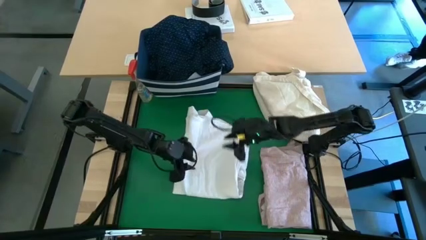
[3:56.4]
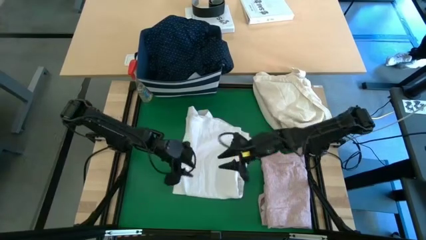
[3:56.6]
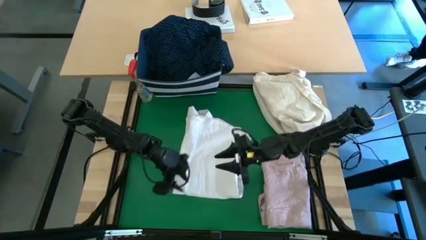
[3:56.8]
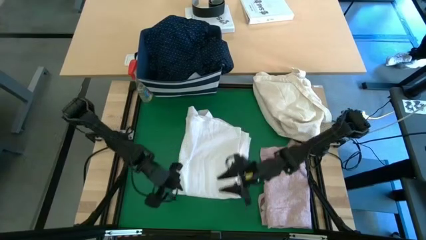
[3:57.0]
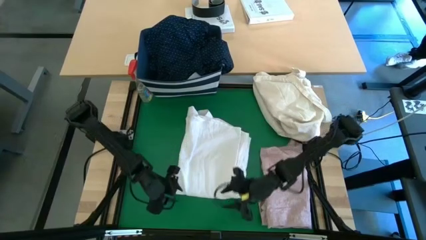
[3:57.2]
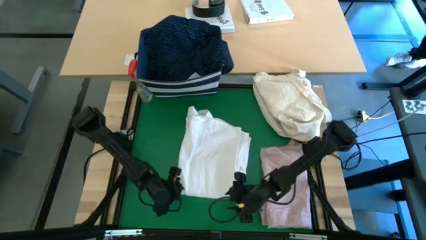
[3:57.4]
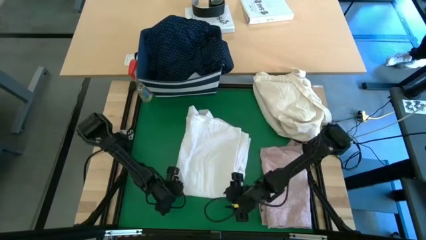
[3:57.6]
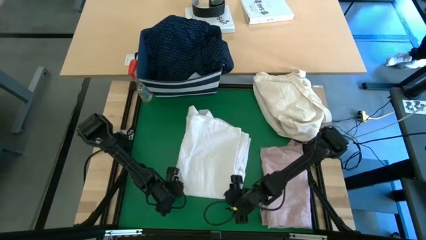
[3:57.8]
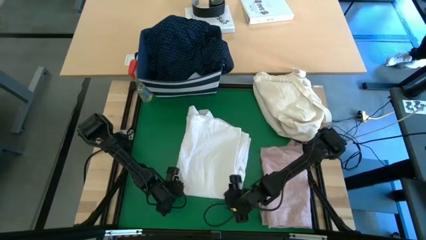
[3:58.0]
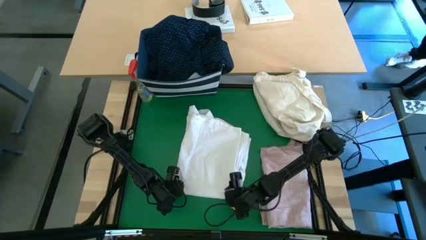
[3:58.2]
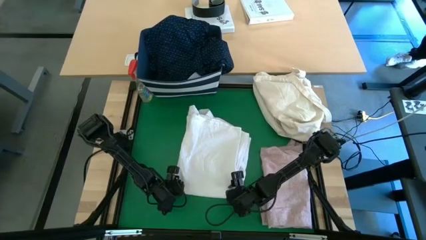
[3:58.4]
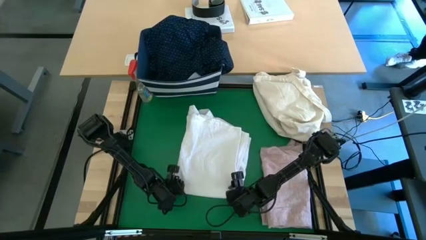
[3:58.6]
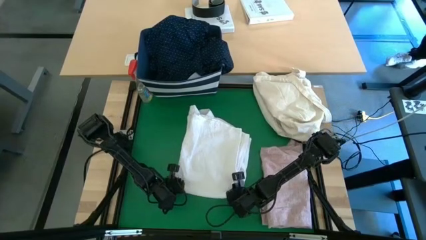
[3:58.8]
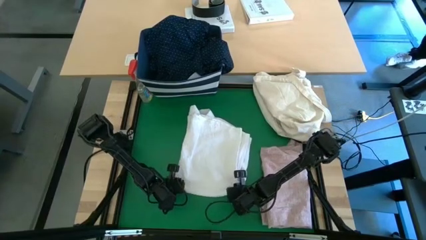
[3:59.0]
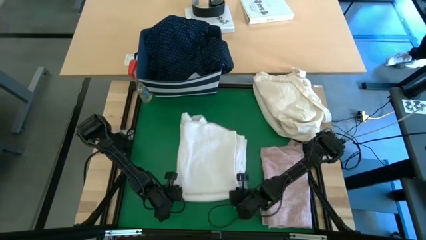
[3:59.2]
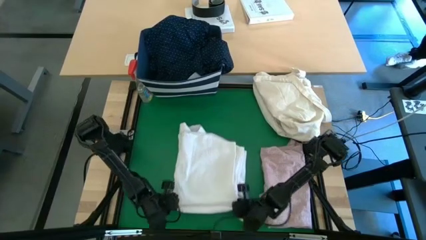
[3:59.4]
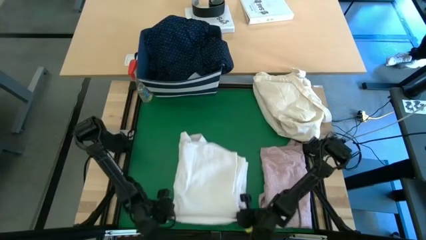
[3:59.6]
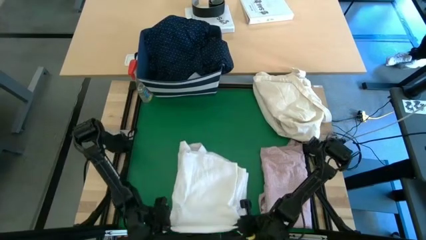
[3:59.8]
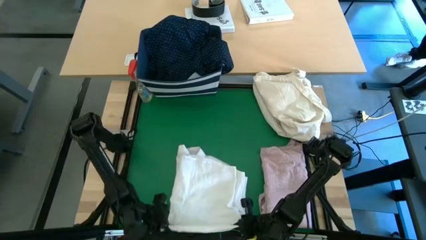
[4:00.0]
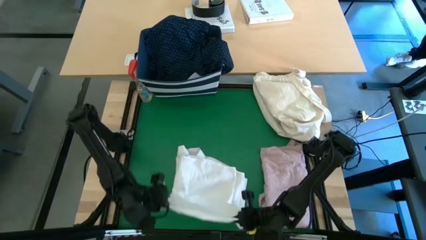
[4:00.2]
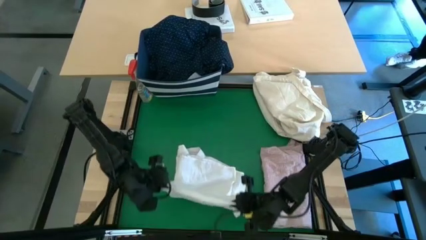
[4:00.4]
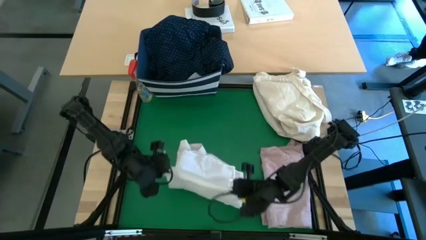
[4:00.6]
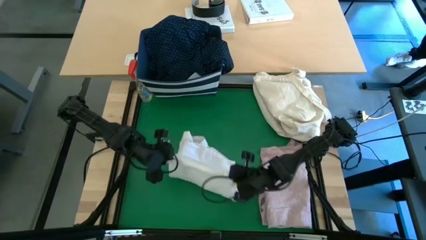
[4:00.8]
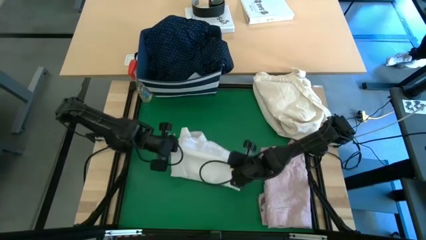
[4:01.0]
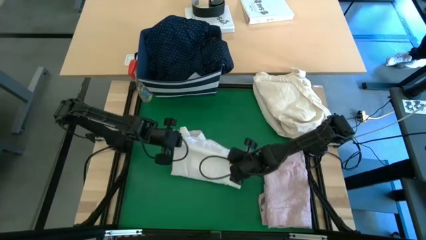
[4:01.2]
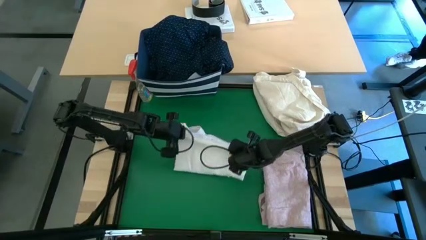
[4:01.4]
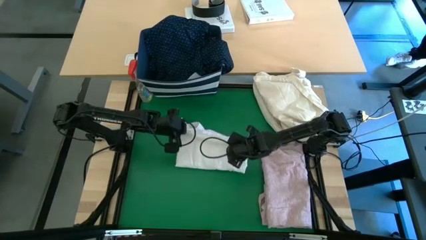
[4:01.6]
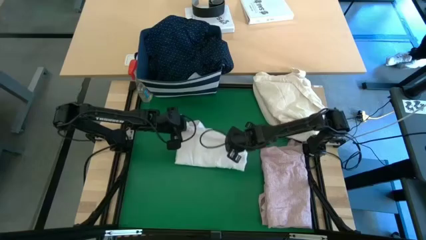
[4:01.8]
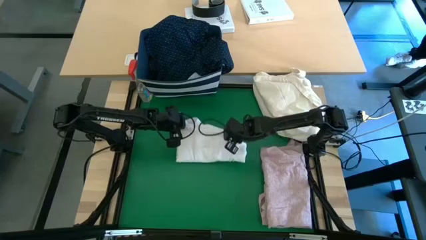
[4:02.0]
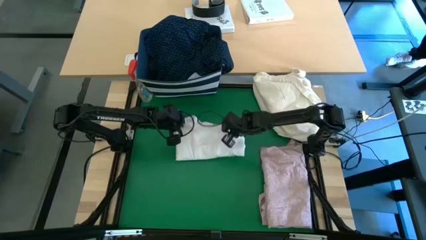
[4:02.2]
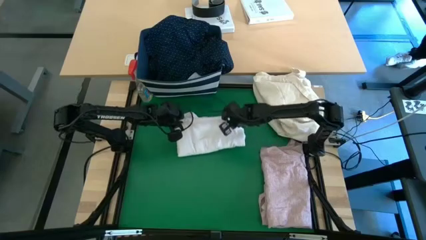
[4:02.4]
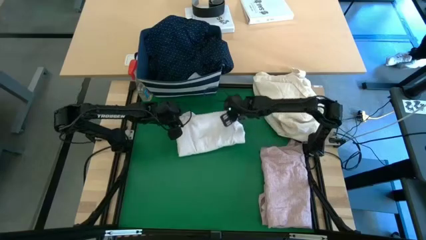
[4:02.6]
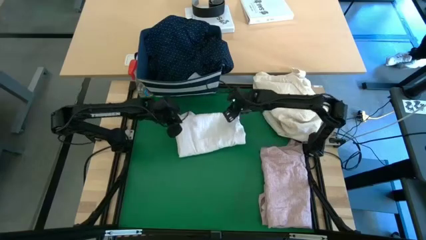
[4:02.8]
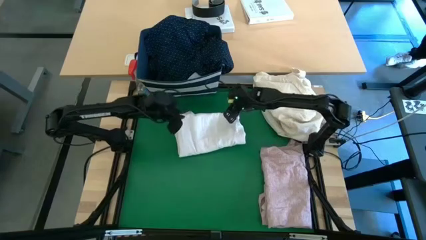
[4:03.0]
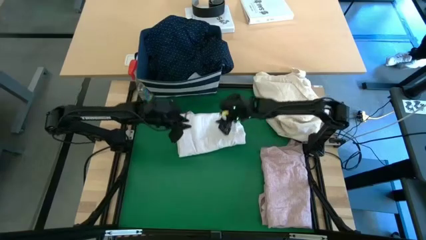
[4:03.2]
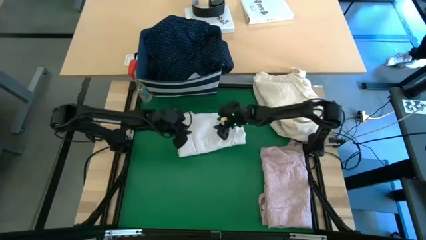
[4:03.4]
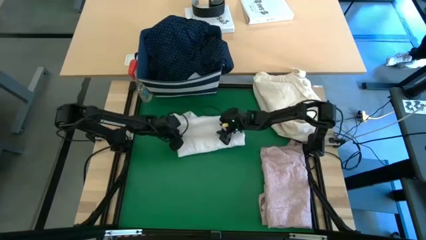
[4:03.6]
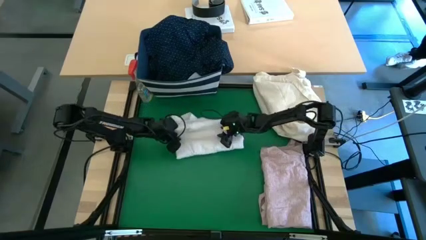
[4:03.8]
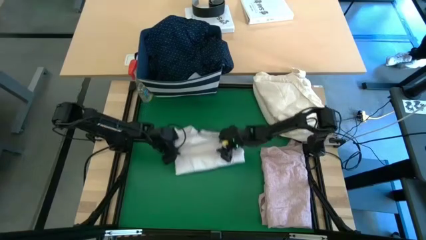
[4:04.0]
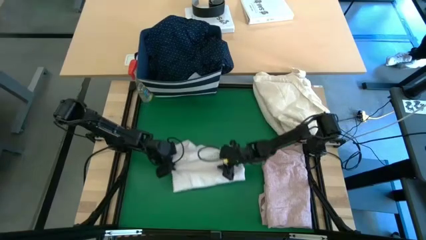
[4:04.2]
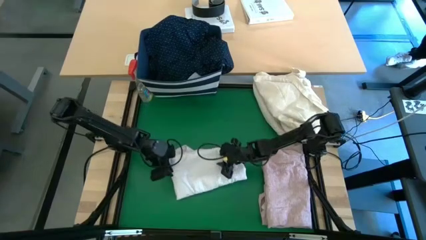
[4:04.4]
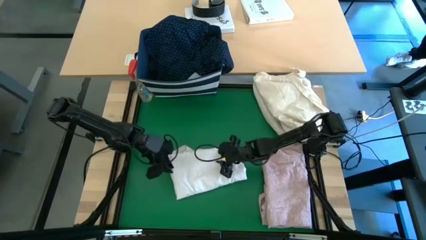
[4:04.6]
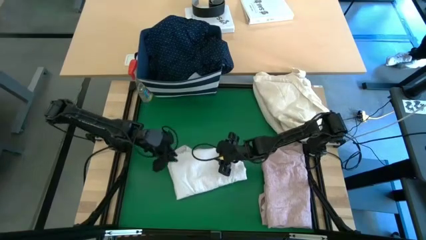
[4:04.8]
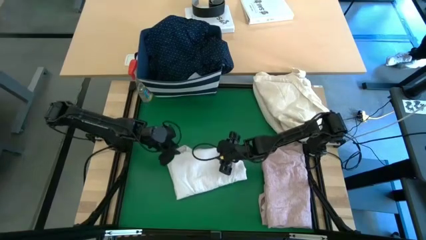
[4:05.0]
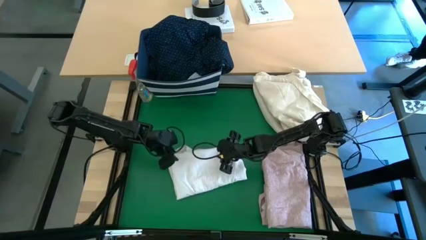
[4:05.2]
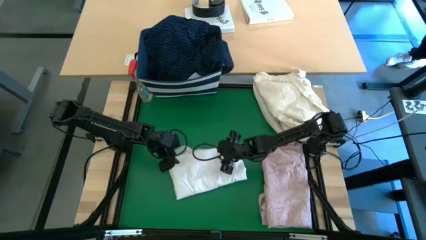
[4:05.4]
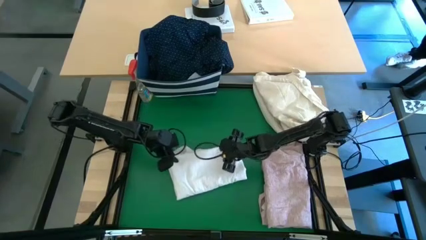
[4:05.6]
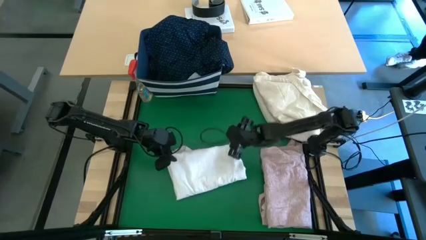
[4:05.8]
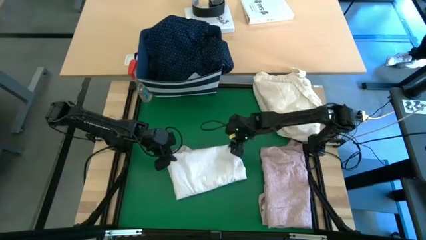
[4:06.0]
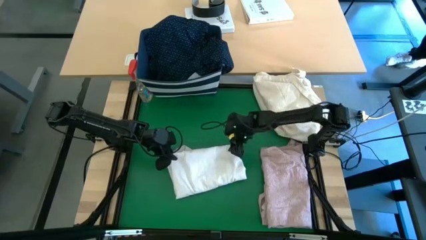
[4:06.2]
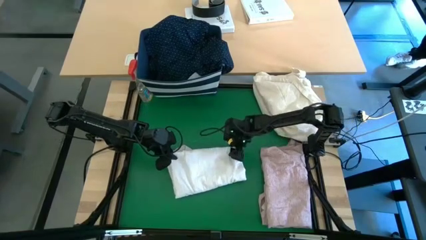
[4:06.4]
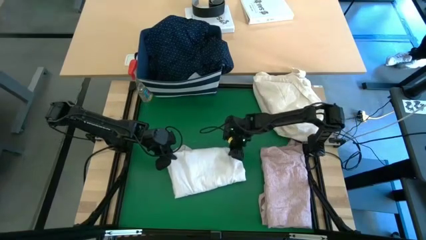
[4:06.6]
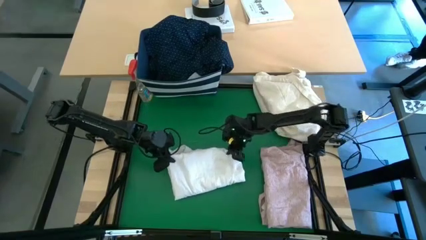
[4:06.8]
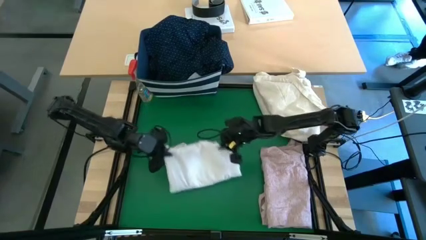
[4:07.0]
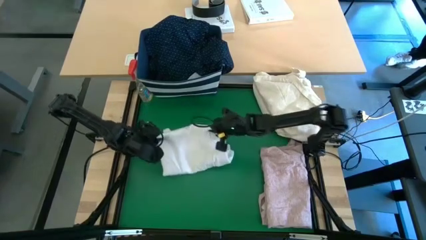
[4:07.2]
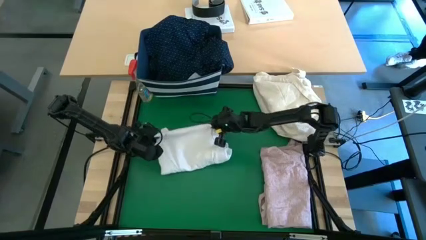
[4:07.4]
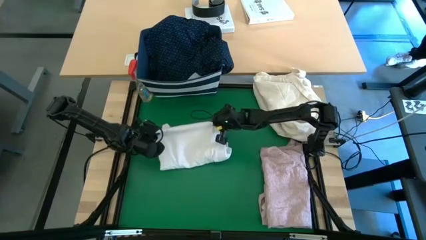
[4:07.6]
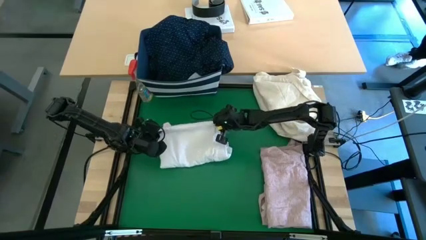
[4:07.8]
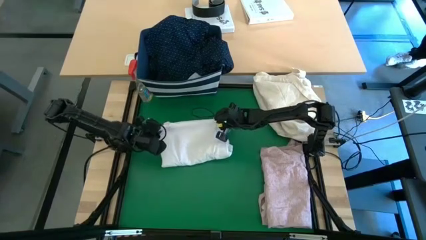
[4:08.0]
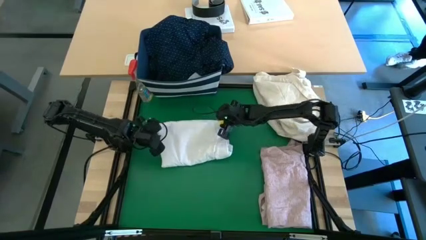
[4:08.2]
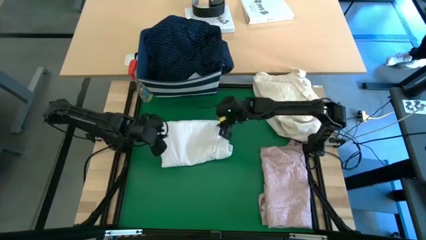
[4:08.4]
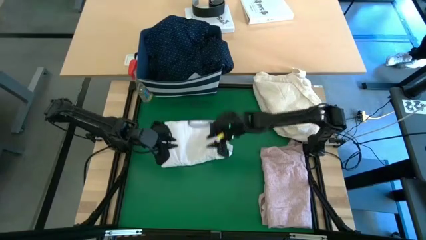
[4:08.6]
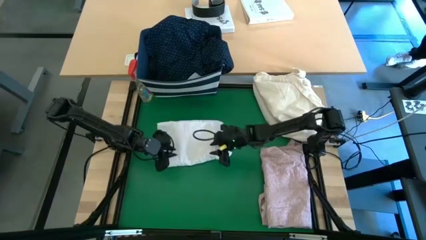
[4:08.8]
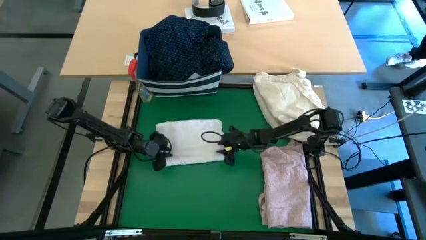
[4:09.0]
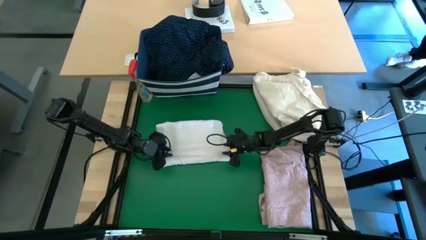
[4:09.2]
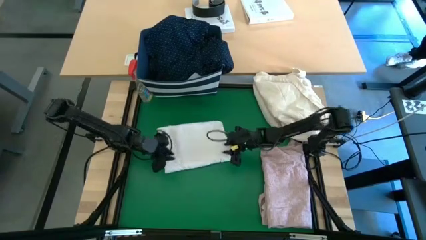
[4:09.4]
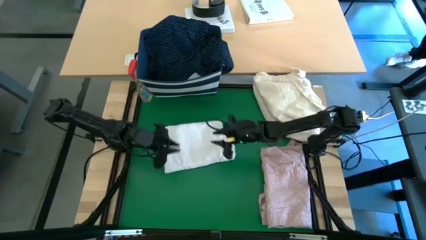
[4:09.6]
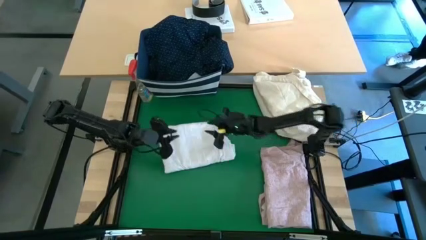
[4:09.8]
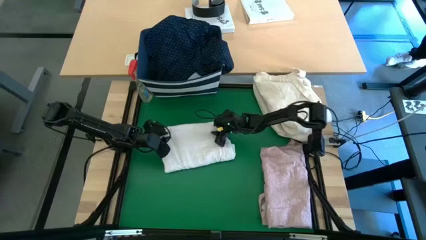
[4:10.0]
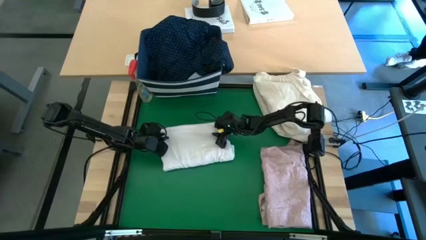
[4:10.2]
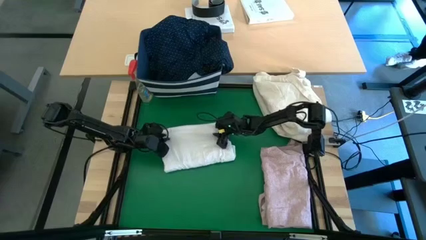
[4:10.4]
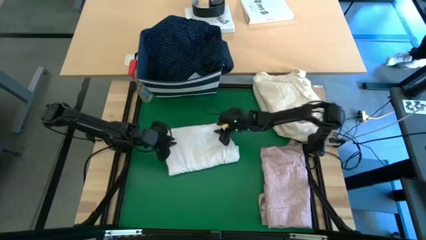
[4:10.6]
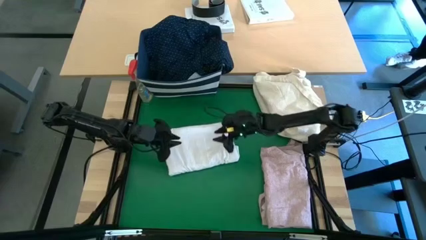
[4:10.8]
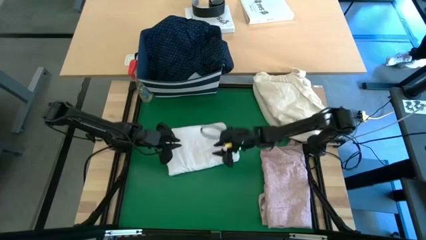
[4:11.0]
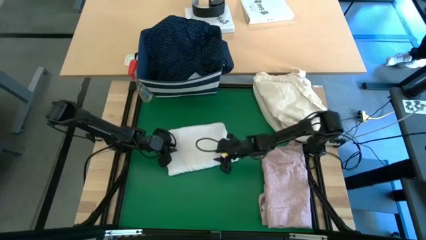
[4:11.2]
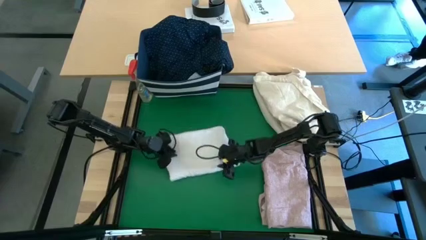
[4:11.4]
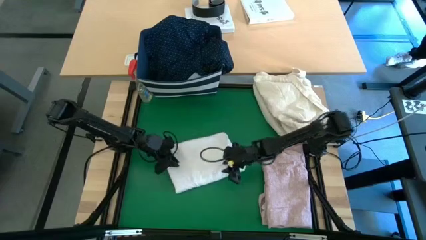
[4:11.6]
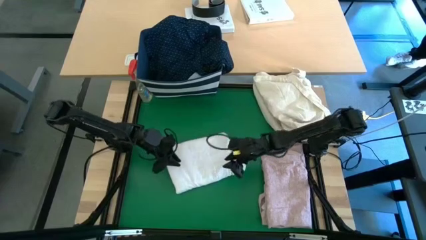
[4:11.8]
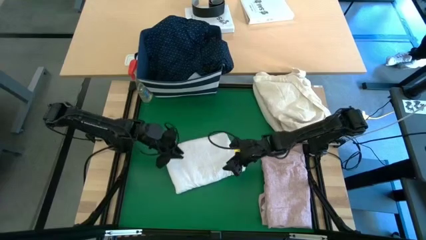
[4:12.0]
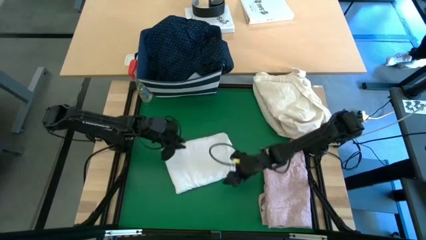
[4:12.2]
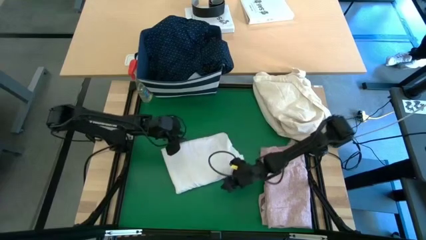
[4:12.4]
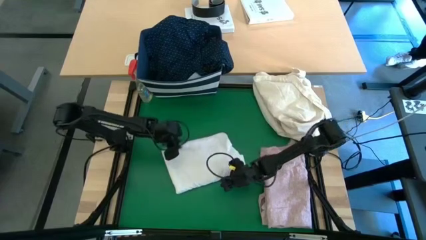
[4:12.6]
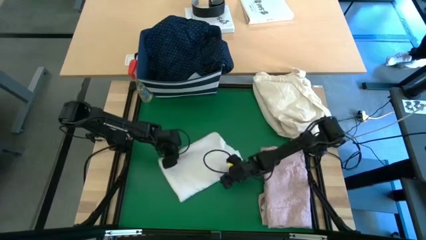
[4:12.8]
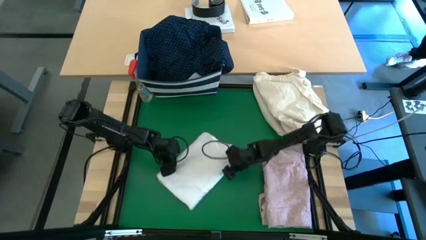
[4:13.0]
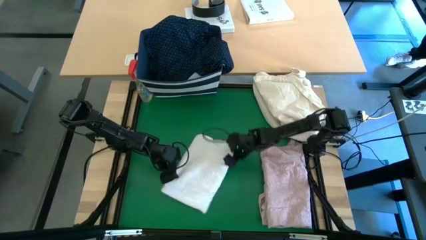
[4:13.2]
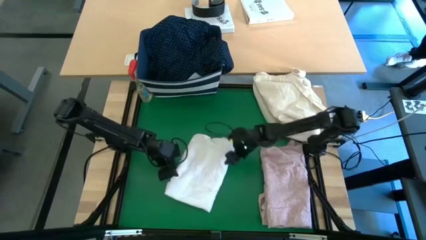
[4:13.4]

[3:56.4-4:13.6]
Task: Fold laundry
Fold the white polo shirt
